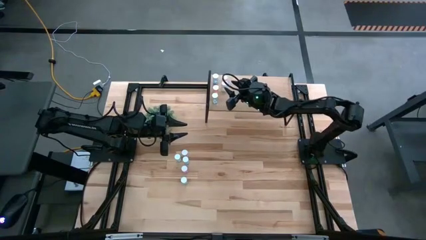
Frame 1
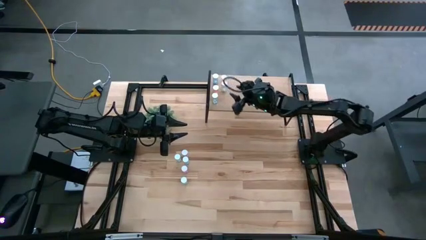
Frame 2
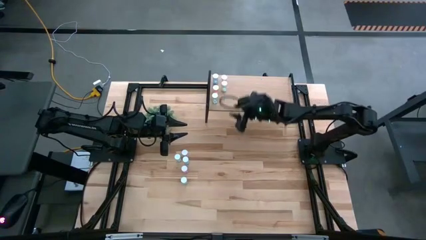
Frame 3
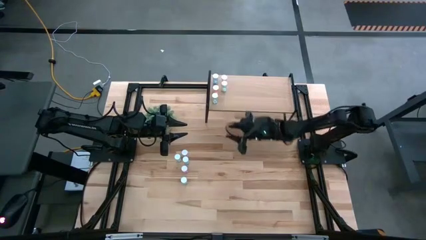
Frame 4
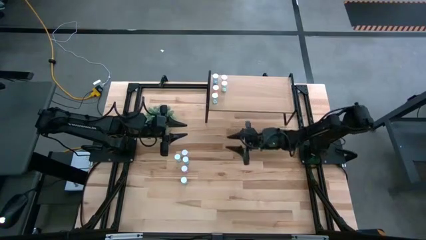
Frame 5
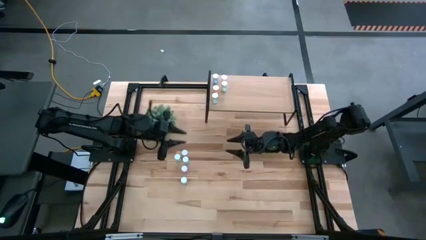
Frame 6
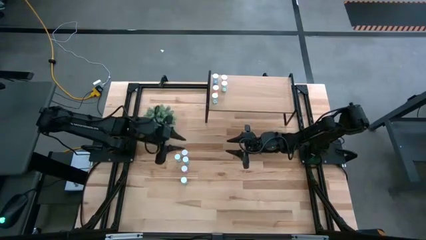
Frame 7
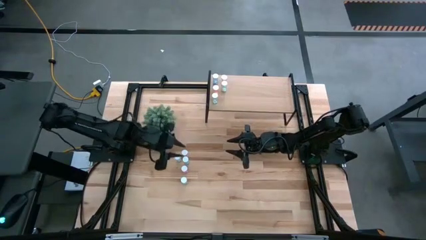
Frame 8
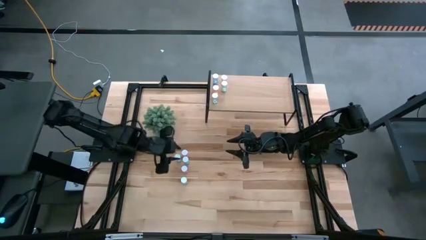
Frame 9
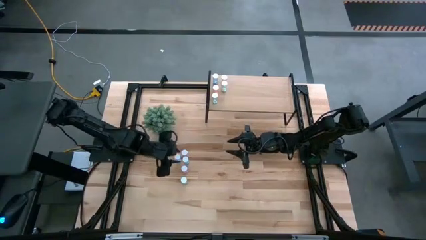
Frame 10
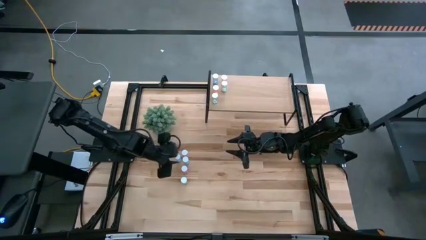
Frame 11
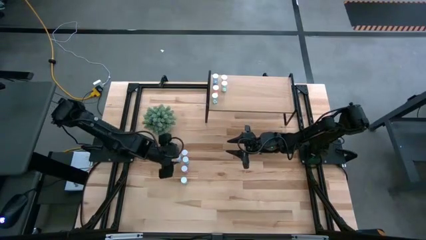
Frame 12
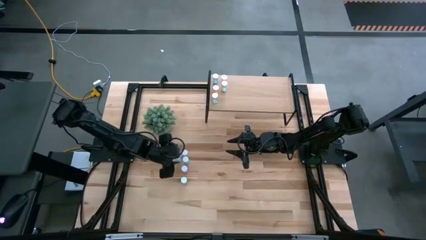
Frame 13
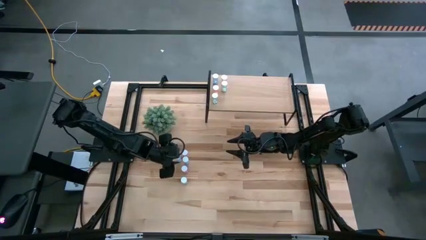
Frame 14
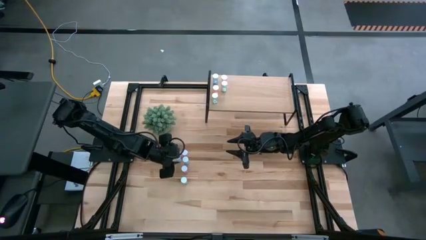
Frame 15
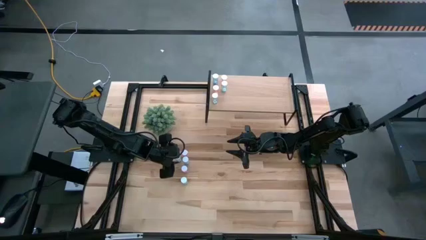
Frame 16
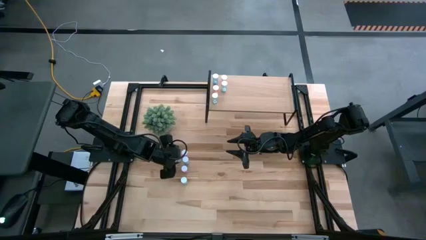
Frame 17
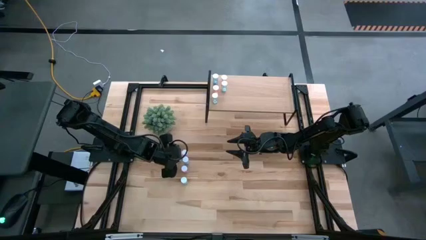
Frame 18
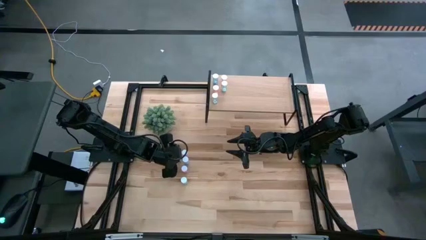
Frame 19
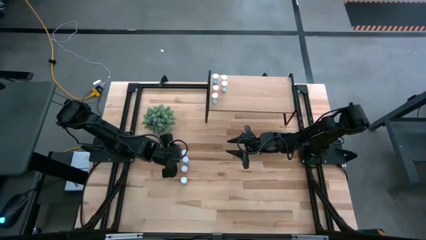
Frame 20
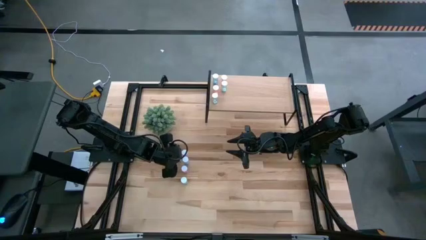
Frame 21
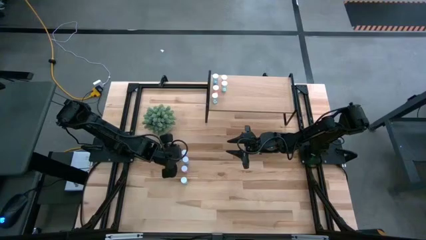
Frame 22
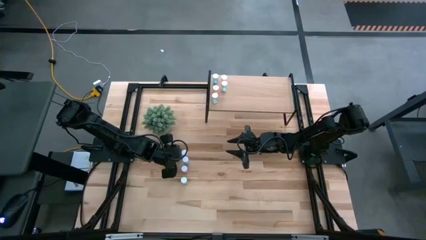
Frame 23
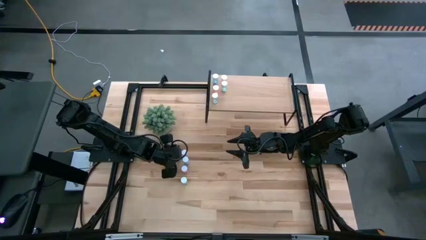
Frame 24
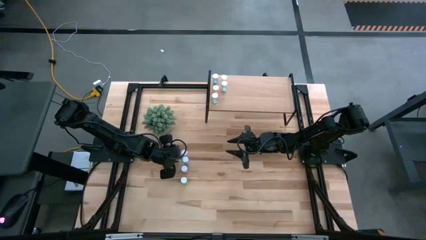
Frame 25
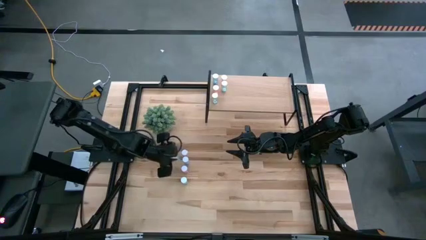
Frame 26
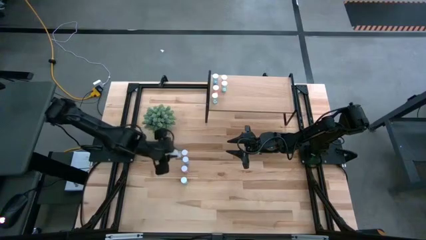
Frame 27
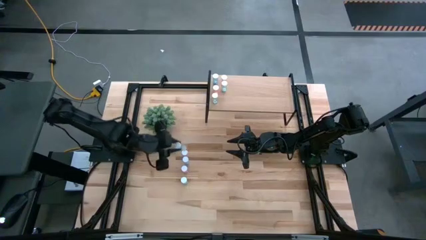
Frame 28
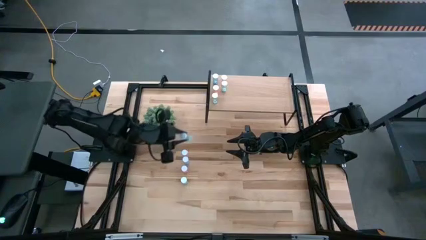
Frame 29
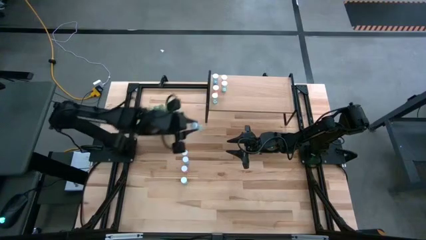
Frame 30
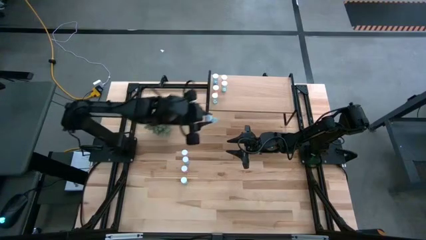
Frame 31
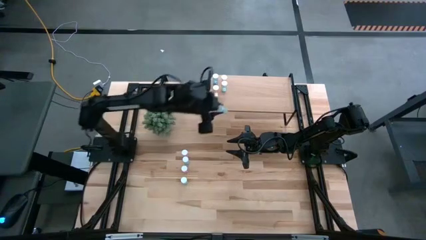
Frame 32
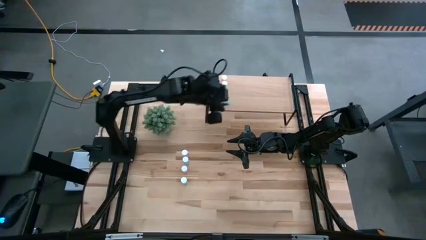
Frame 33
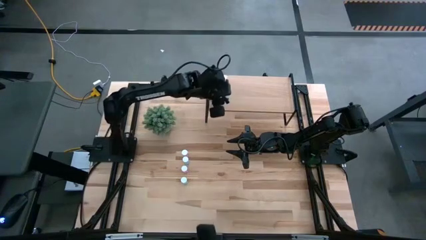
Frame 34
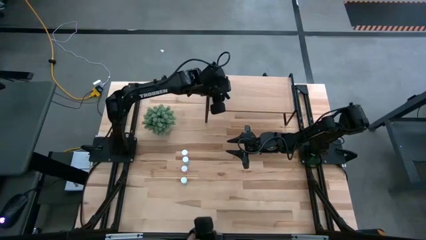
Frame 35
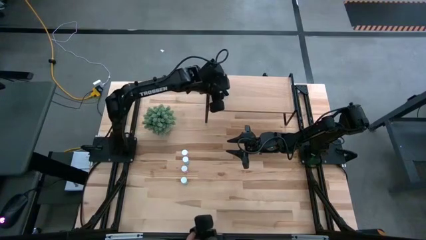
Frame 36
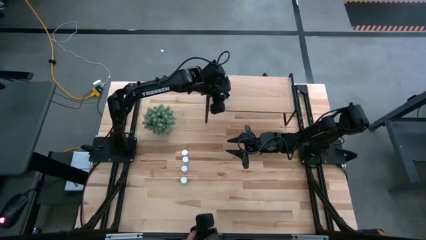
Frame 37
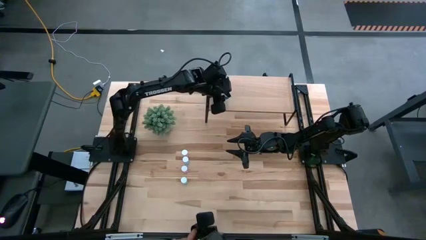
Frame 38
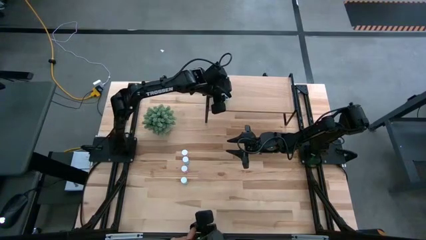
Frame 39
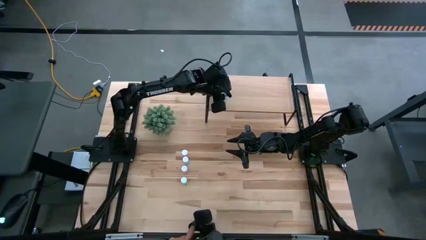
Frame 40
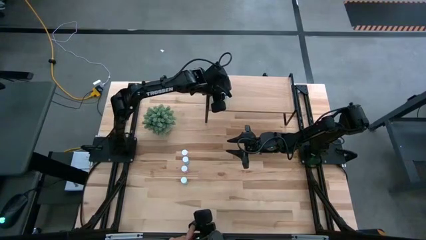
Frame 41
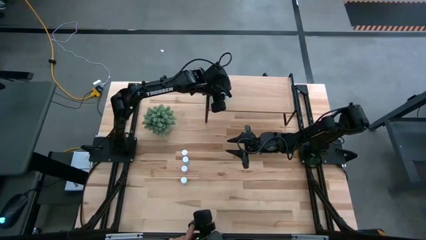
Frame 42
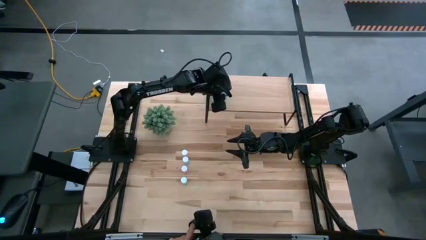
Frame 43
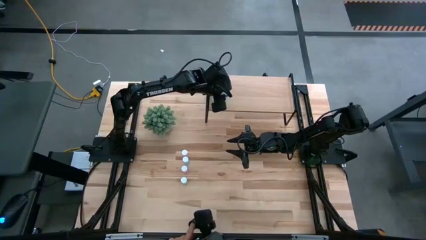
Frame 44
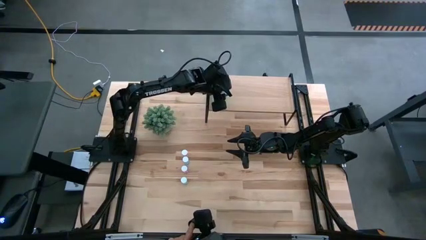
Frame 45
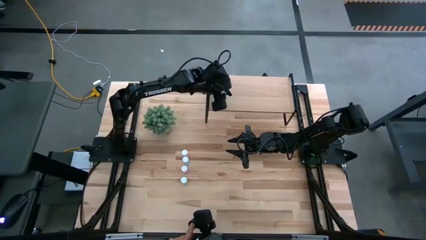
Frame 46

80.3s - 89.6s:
Task: Pick and place medicine bottles onto shelf by color
Put the transparent blue medicine bottle on the shelf
